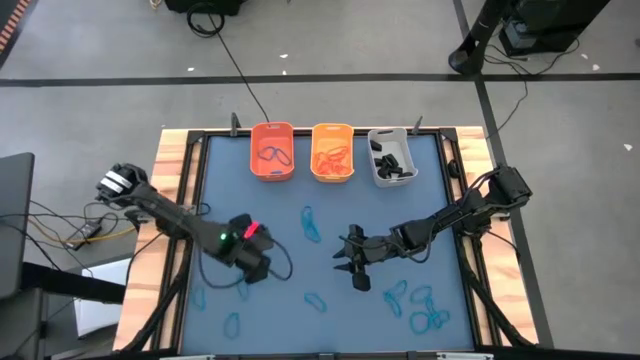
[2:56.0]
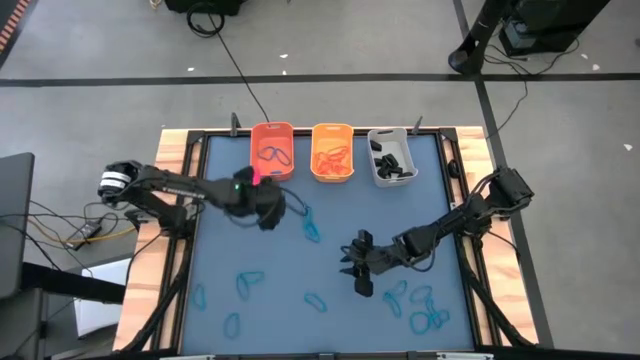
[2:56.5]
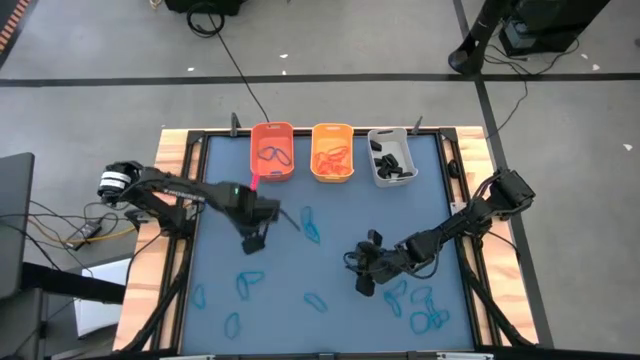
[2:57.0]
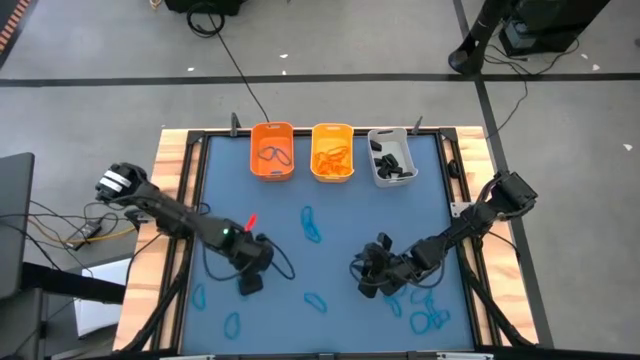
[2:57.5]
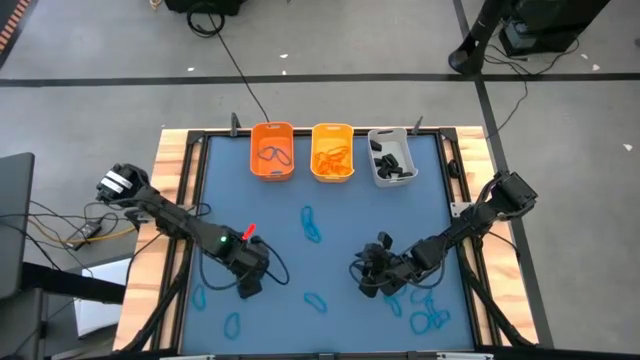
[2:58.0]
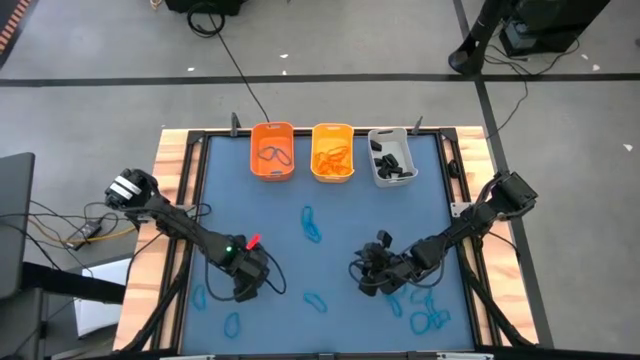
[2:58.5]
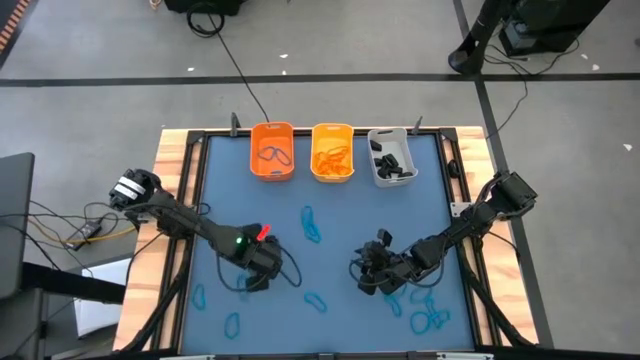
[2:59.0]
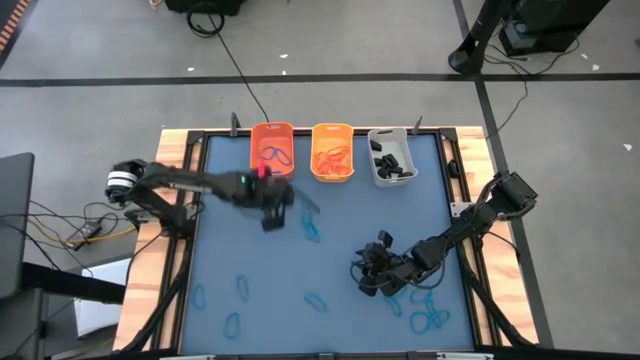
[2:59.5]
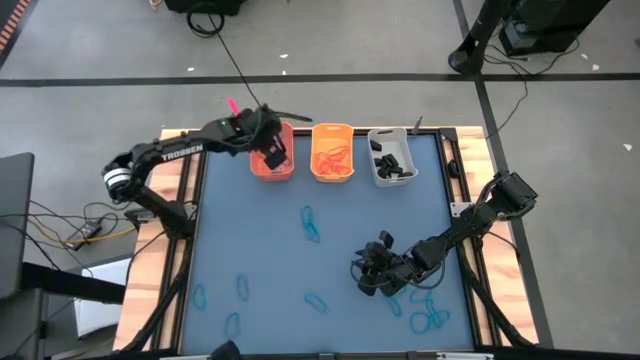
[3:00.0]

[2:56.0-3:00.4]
Task: Sort rubber bands into baskets
Put the blue rubber band into the orange bin

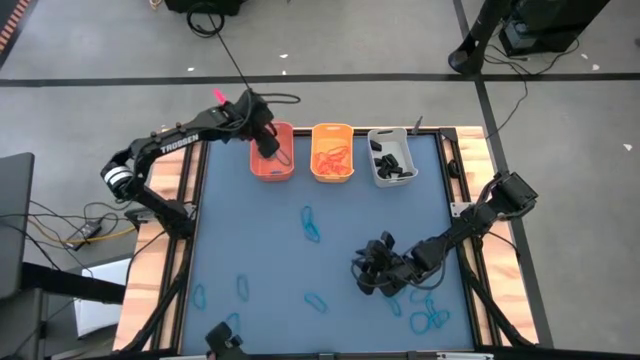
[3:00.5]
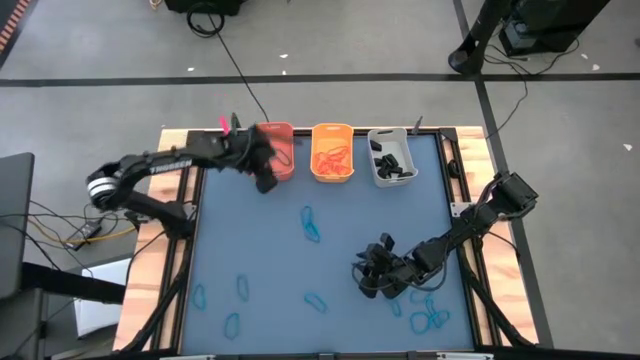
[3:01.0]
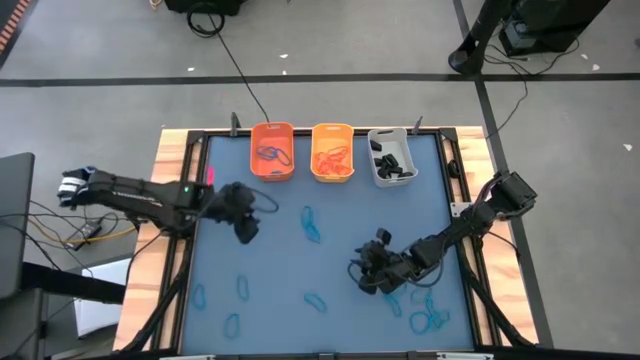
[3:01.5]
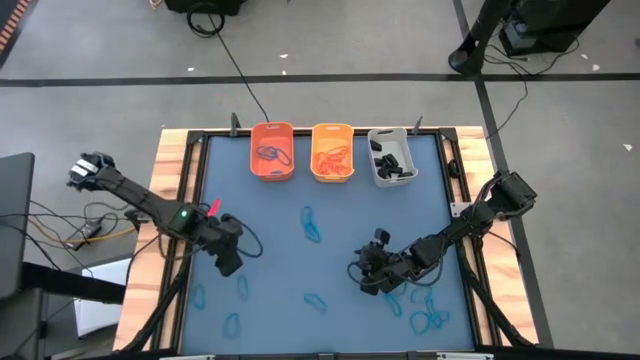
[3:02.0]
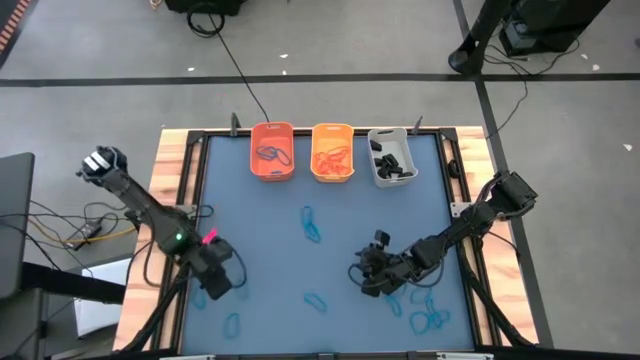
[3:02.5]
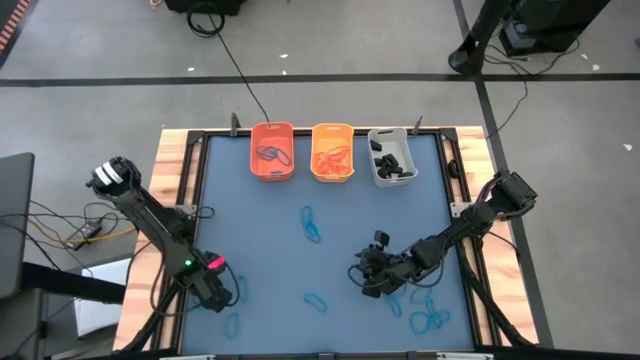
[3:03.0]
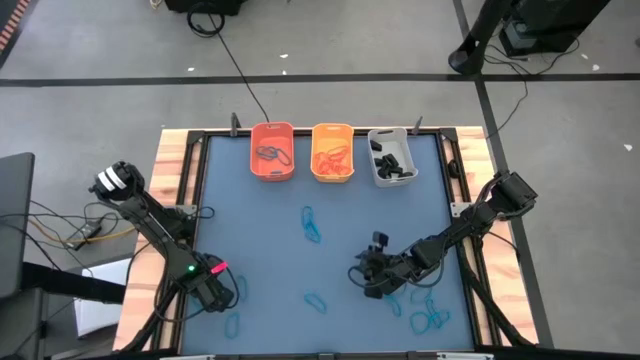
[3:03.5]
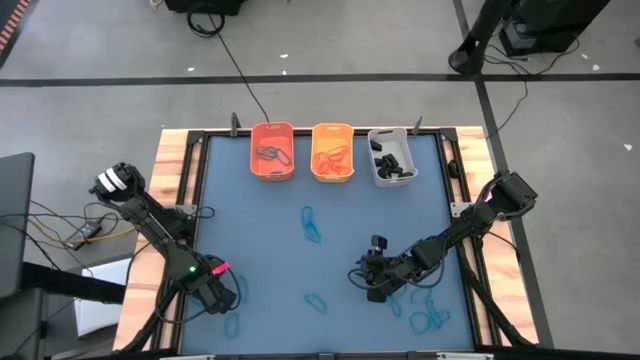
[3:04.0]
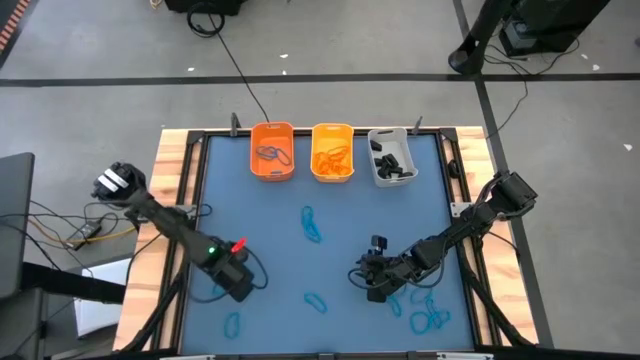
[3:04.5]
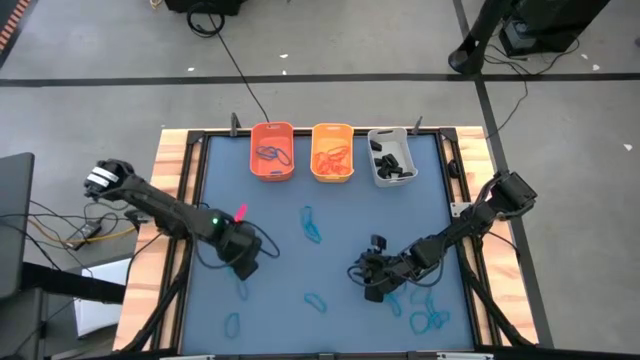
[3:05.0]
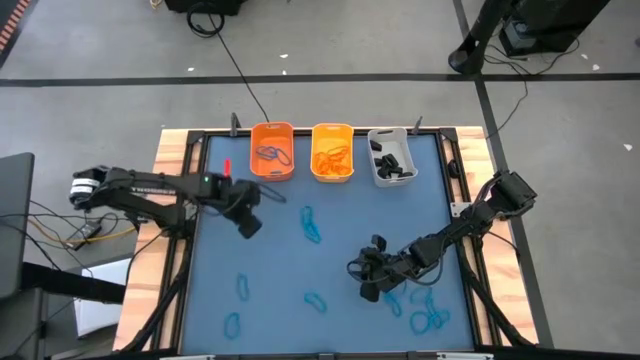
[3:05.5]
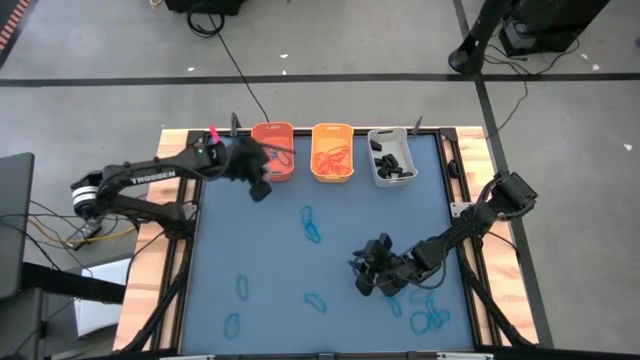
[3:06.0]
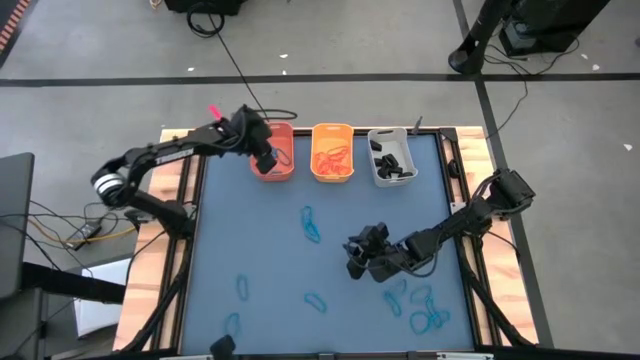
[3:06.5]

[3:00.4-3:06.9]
Put the blue rubber band into the orange bin

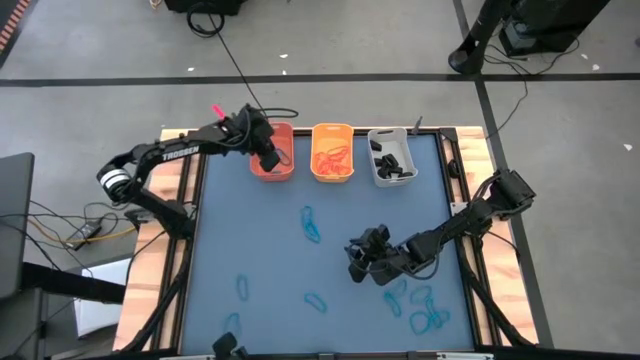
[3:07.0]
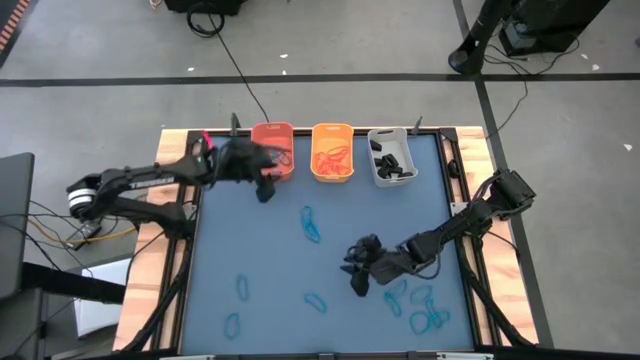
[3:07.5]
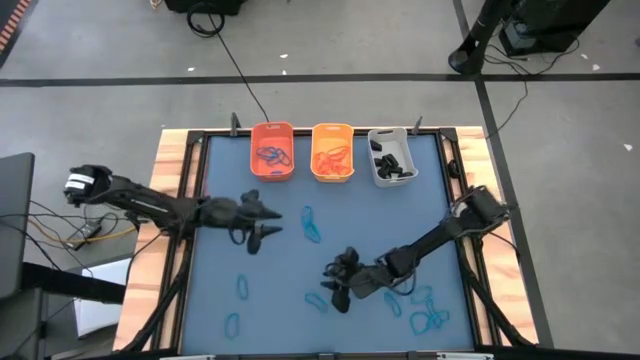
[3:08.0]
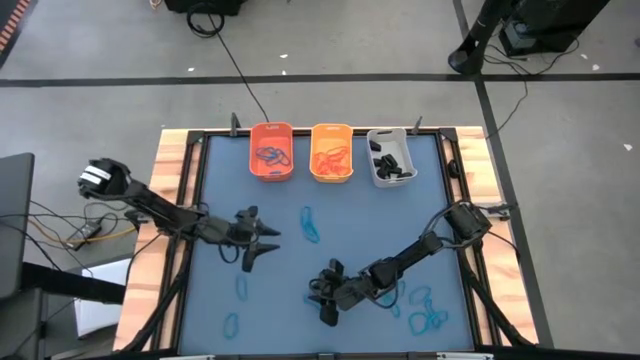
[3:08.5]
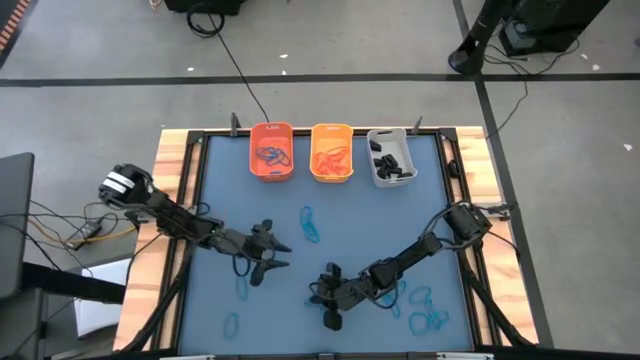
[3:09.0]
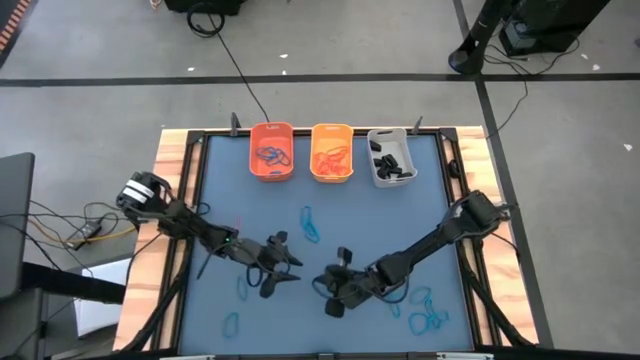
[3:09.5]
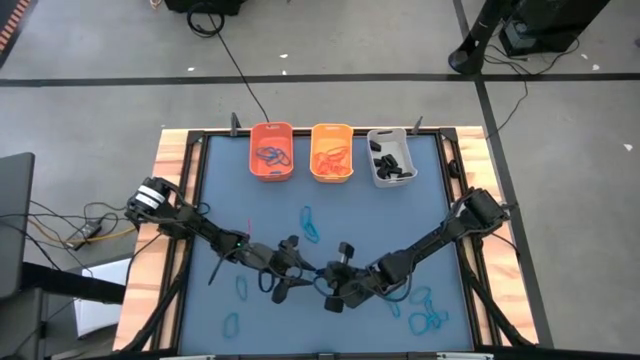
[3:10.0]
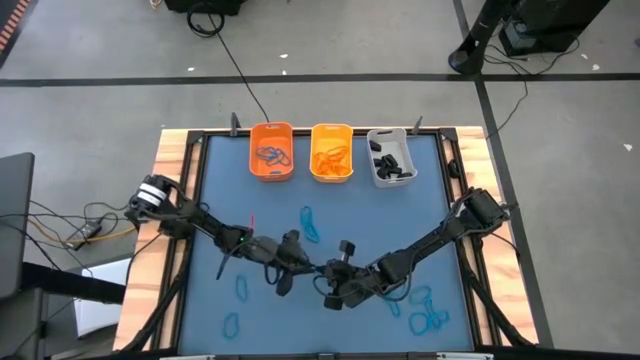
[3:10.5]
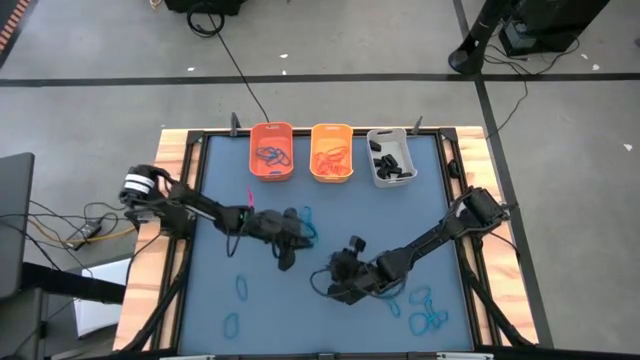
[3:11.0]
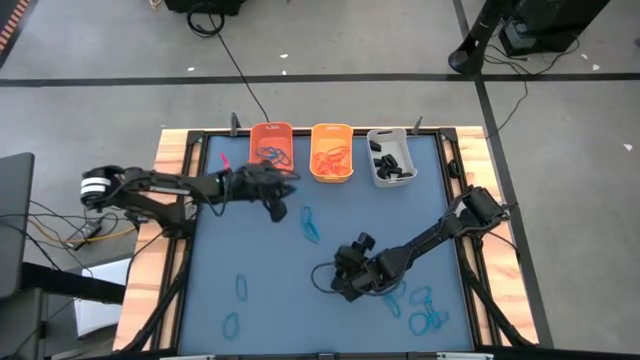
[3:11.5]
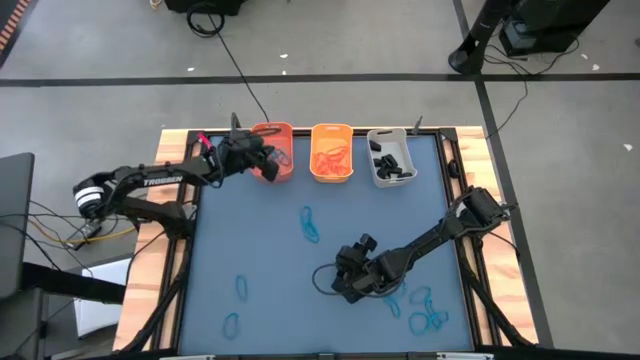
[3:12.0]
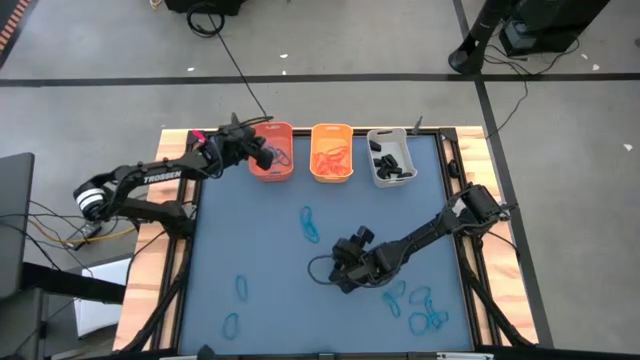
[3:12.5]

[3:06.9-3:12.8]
Put the blue rubber band into the orange bin

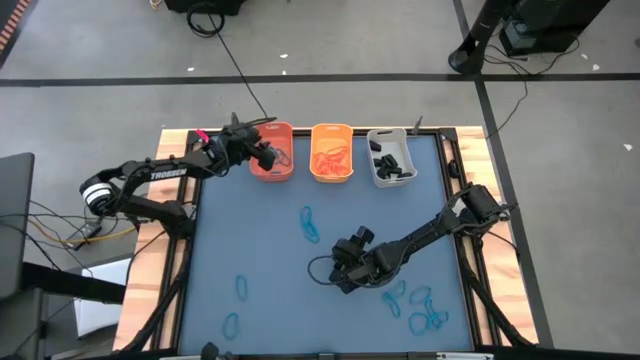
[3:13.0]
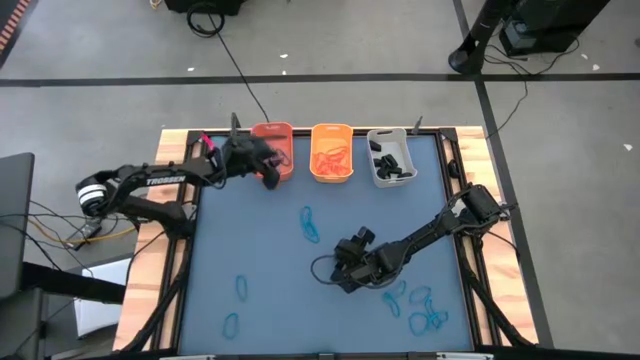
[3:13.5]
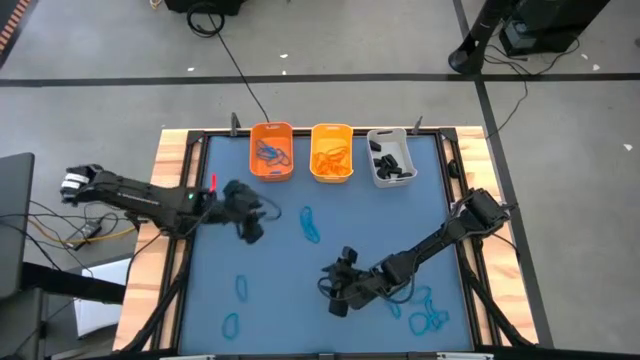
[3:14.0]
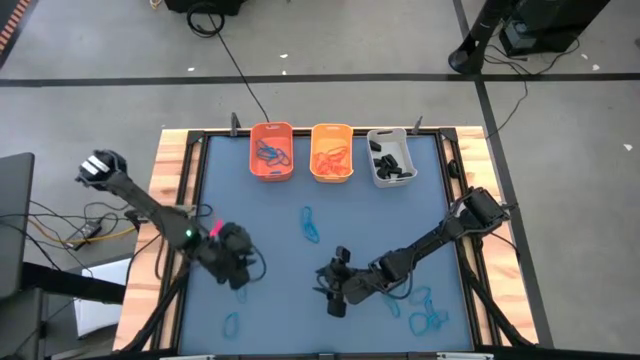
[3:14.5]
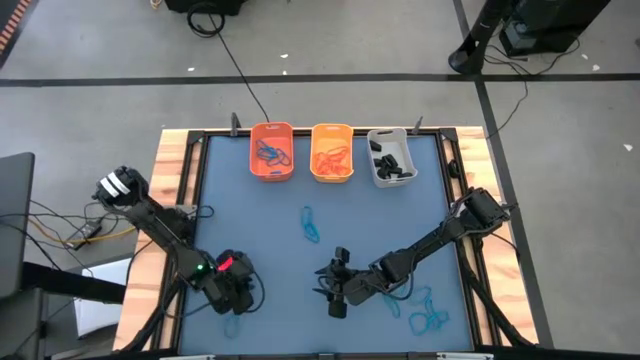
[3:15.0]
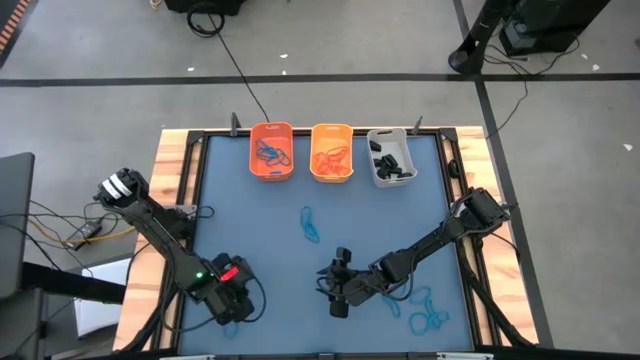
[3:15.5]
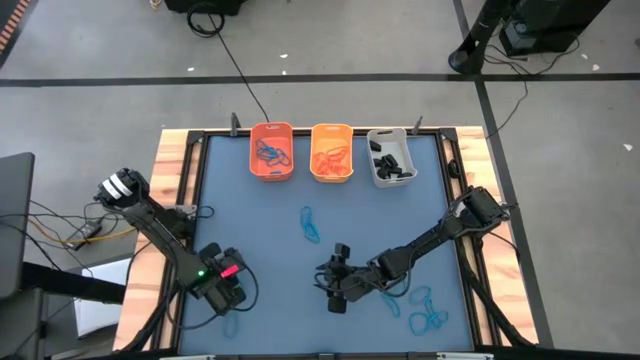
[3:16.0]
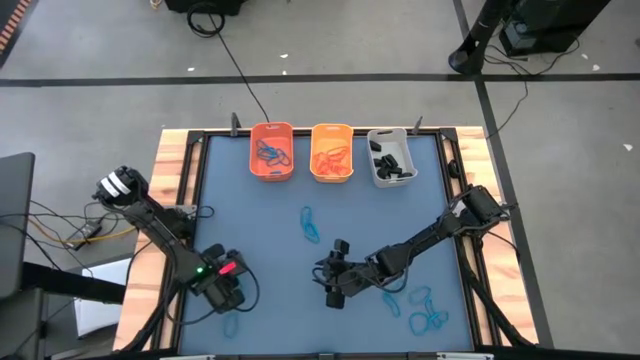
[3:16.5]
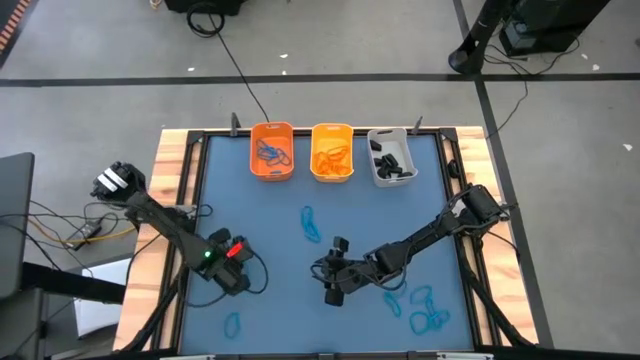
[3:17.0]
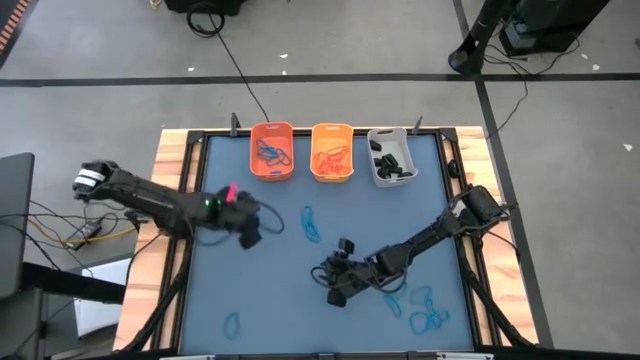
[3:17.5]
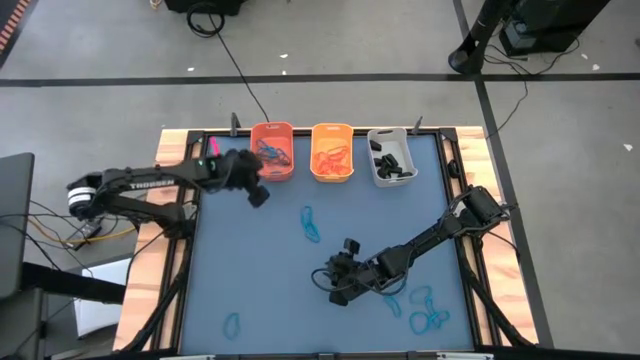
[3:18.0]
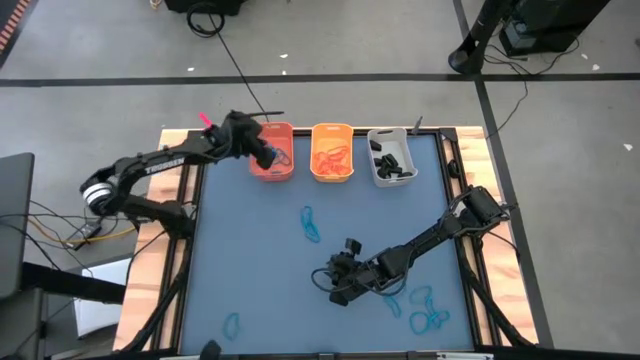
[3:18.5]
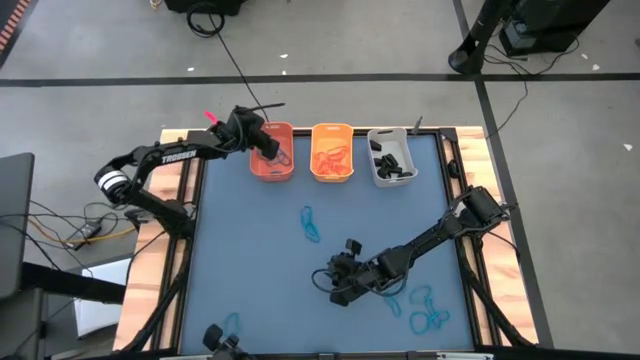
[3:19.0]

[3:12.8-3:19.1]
Put the blue rubber band into the orange bin
